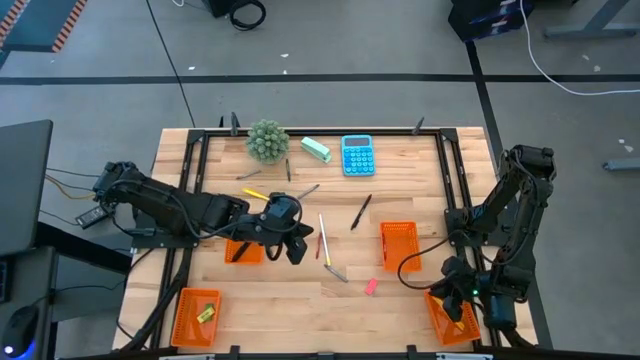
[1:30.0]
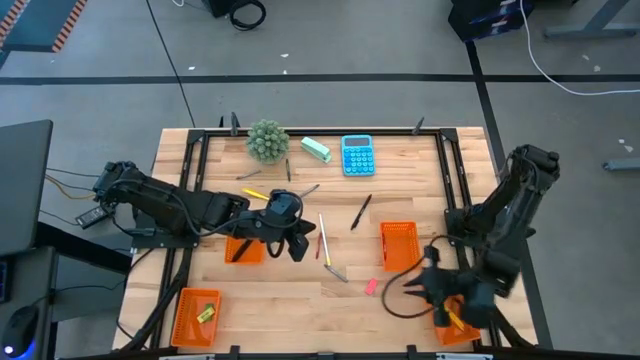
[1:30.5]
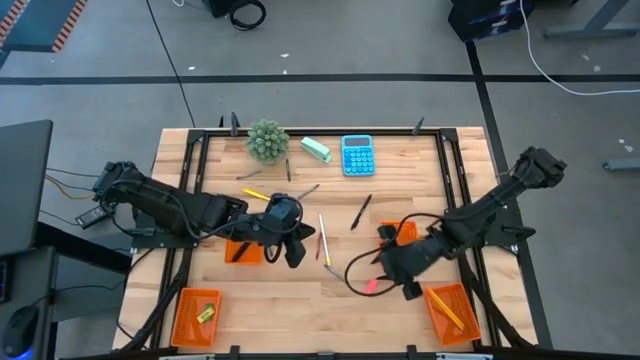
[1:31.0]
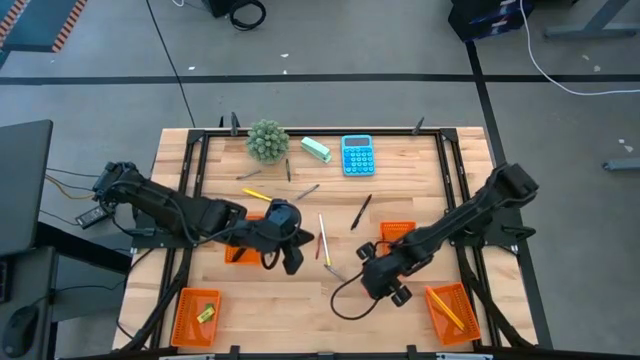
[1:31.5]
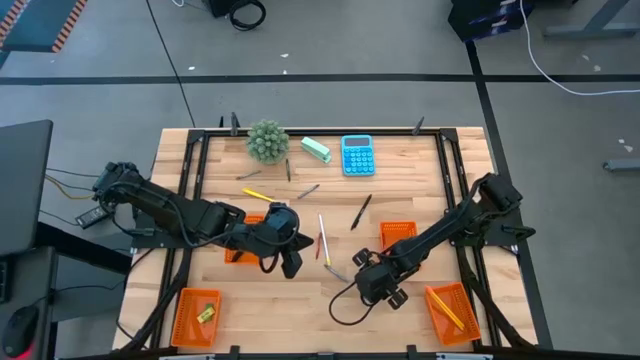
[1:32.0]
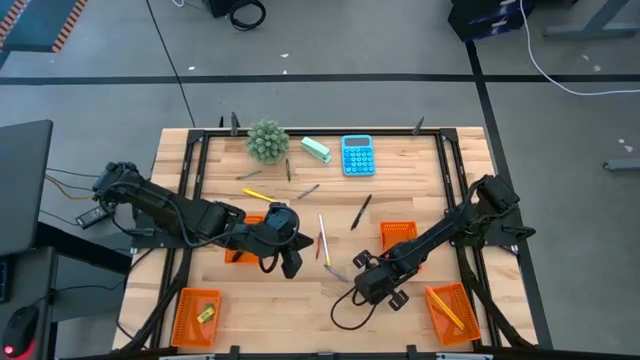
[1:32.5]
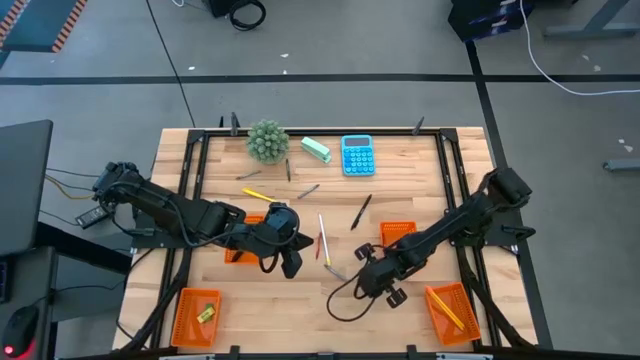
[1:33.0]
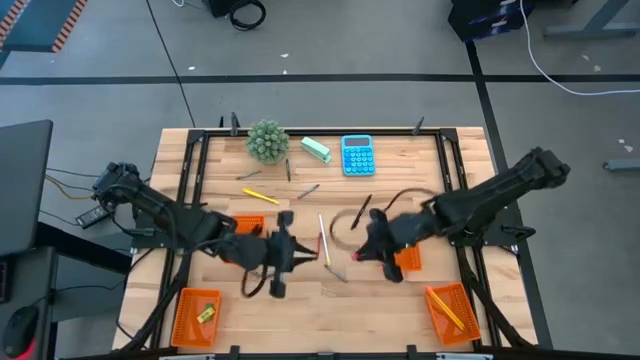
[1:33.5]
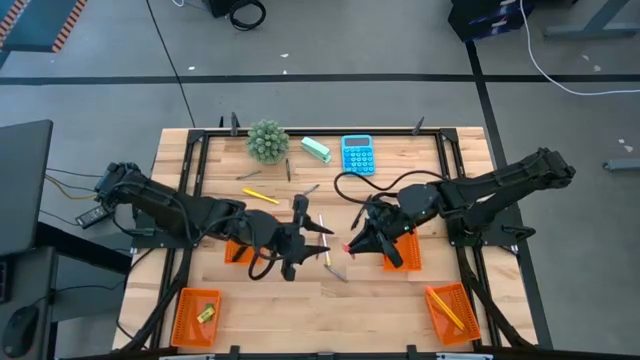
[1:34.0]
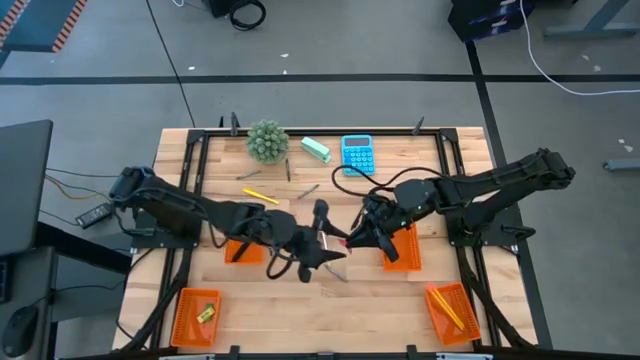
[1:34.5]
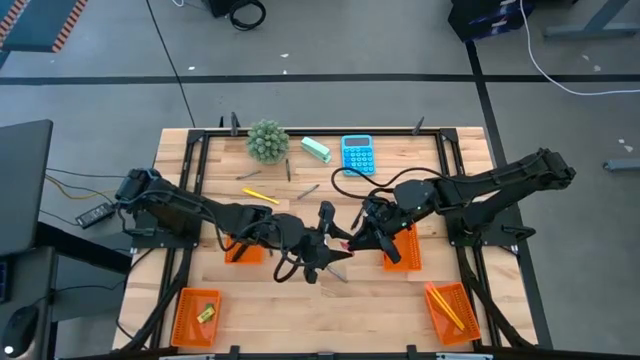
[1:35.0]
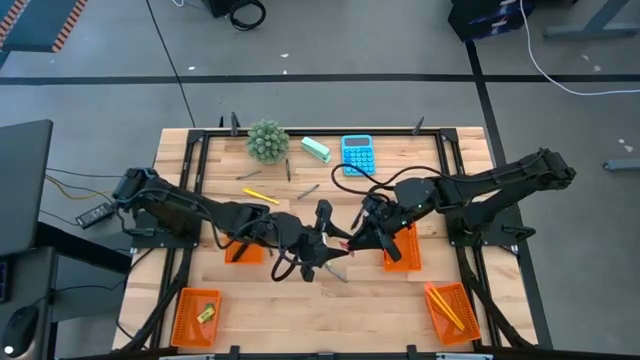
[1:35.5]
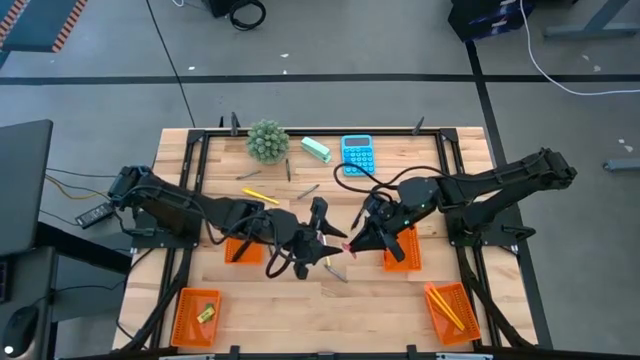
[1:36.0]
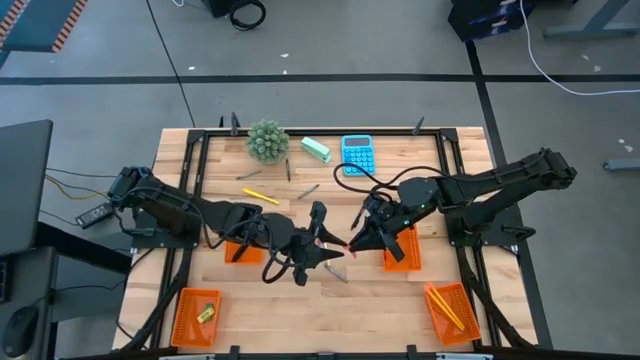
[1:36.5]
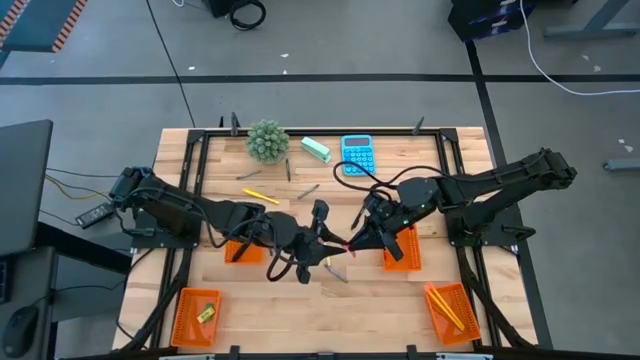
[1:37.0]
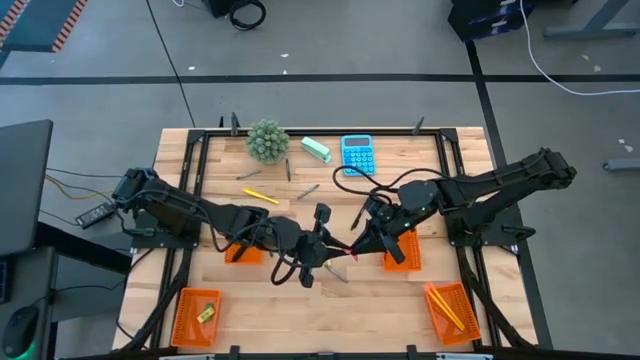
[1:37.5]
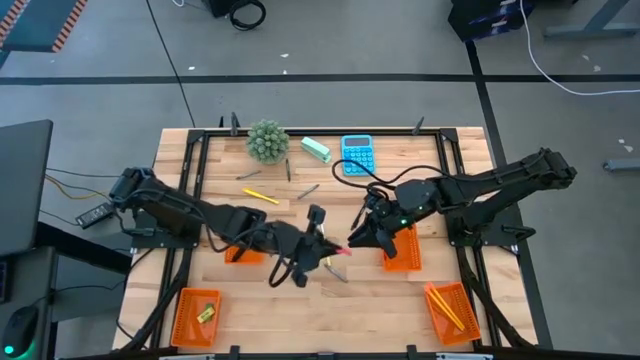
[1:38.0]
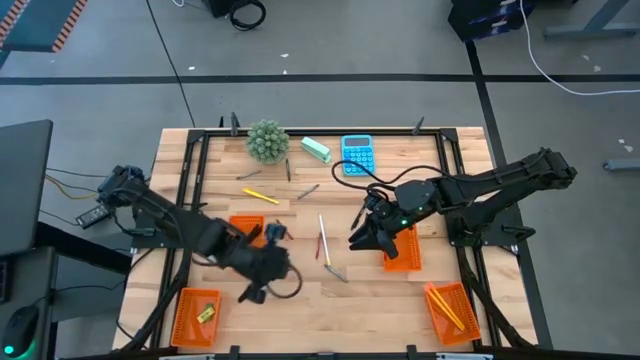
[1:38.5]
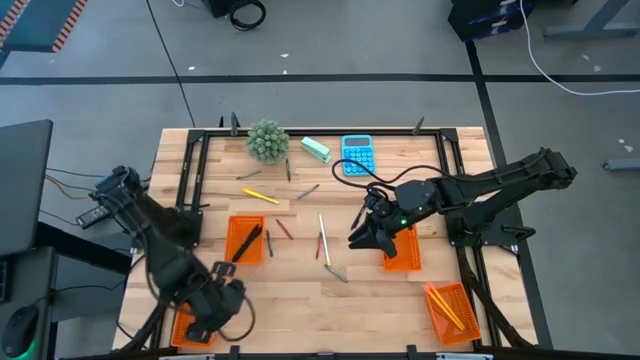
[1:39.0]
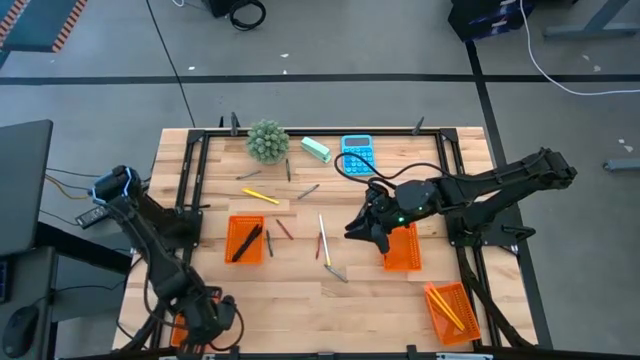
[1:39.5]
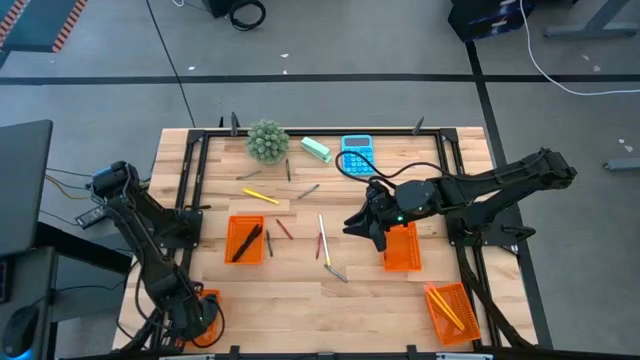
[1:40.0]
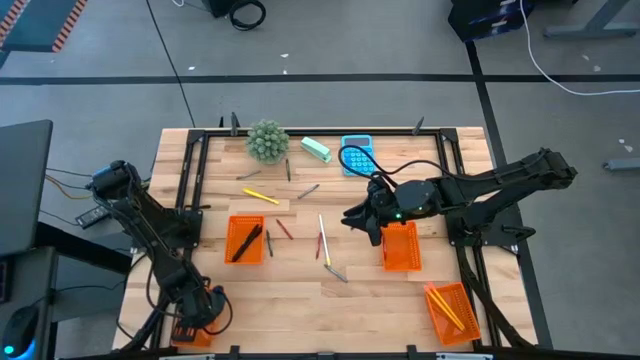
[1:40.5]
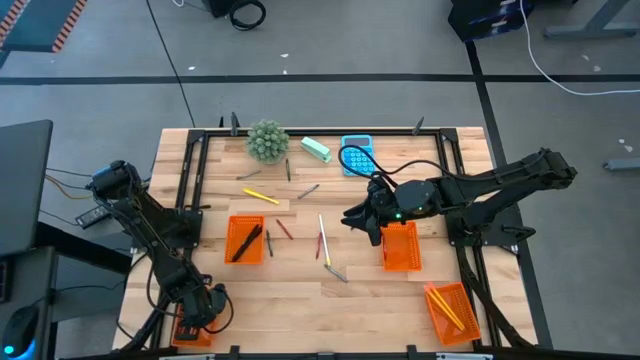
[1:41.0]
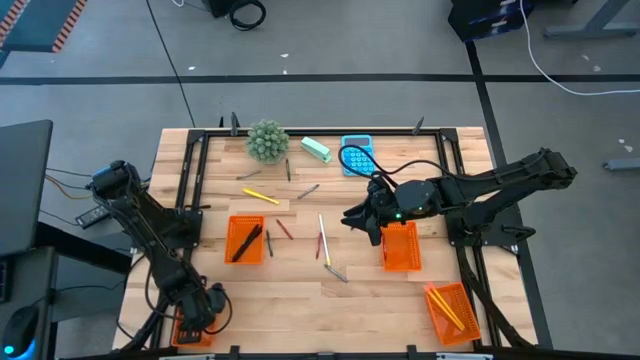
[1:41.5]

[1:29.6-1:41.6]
Task: Sort crayons/erasers/pens/pencils in bins
Put the pink eraser into the bottom left orange basket

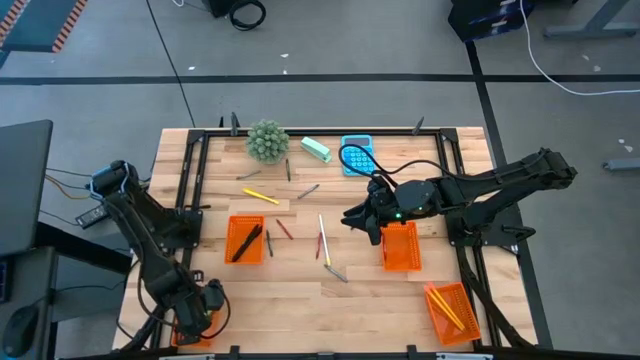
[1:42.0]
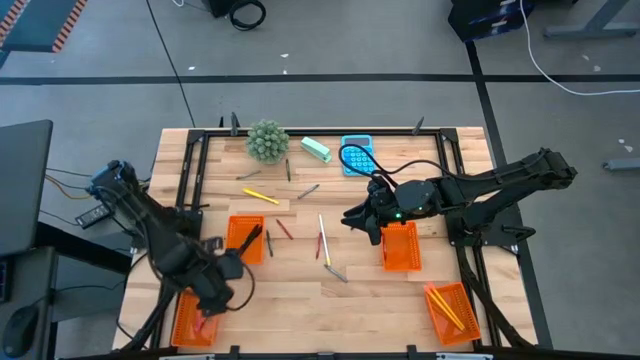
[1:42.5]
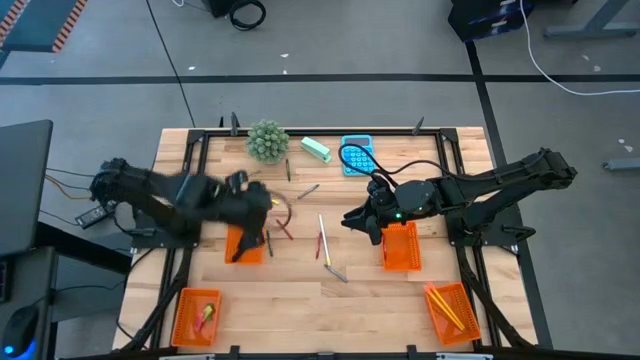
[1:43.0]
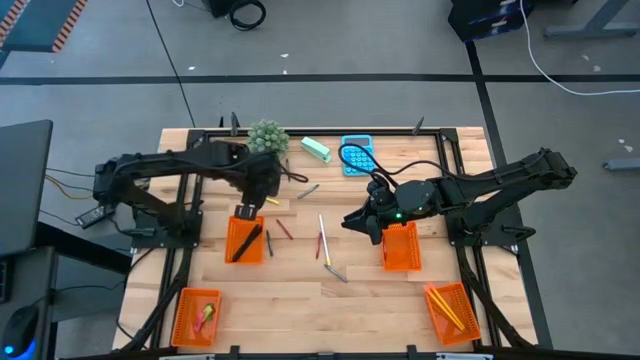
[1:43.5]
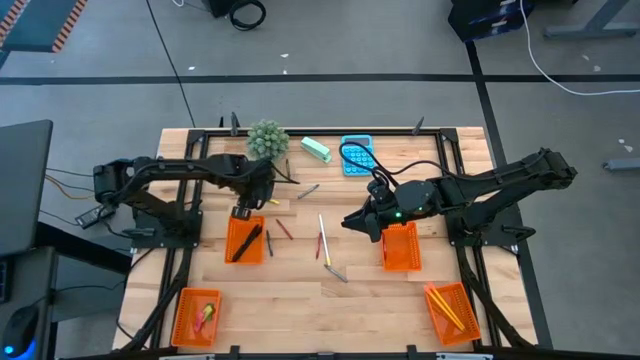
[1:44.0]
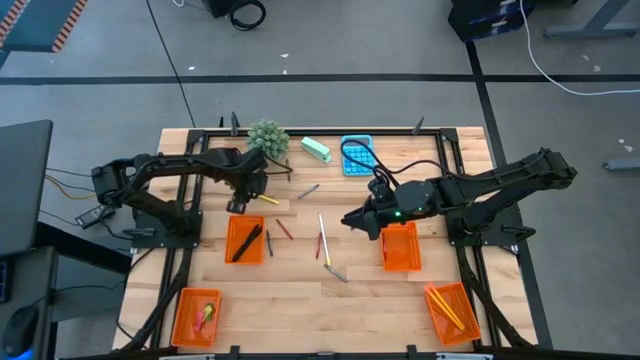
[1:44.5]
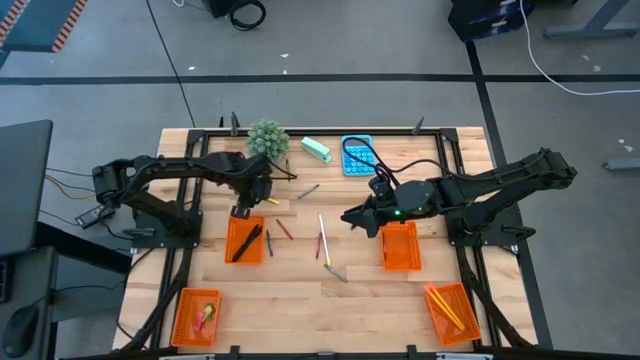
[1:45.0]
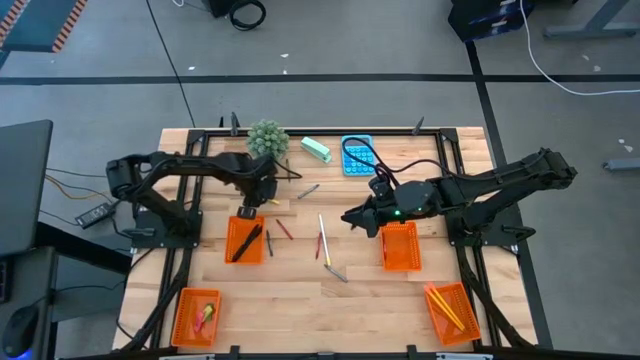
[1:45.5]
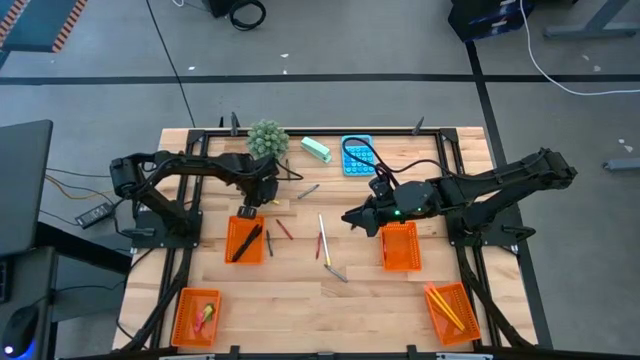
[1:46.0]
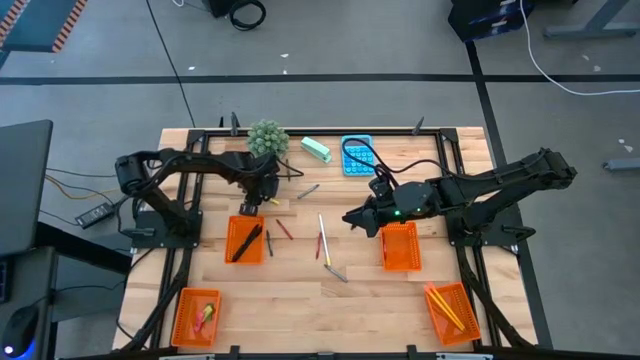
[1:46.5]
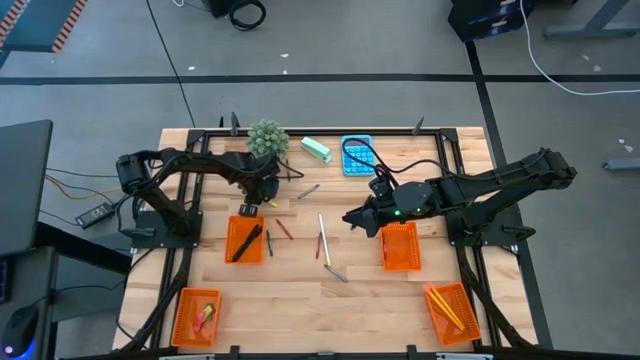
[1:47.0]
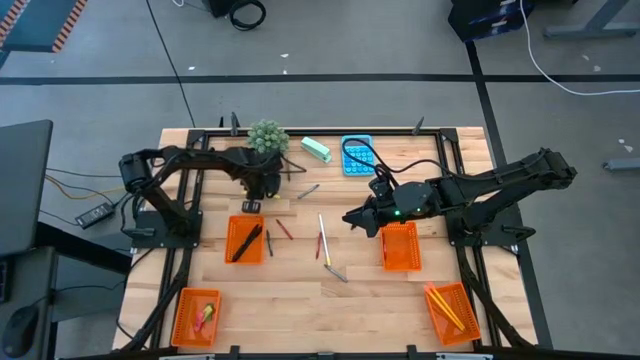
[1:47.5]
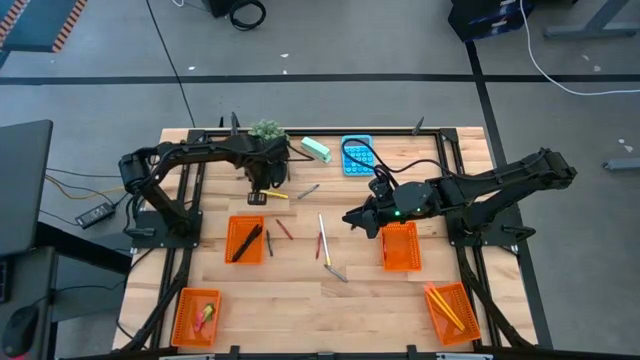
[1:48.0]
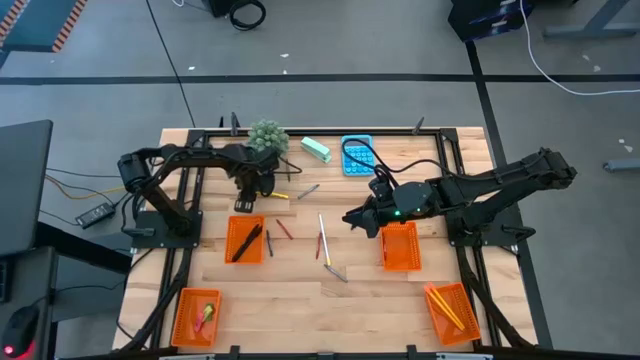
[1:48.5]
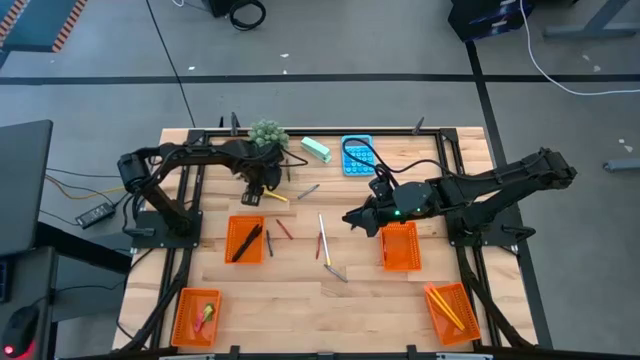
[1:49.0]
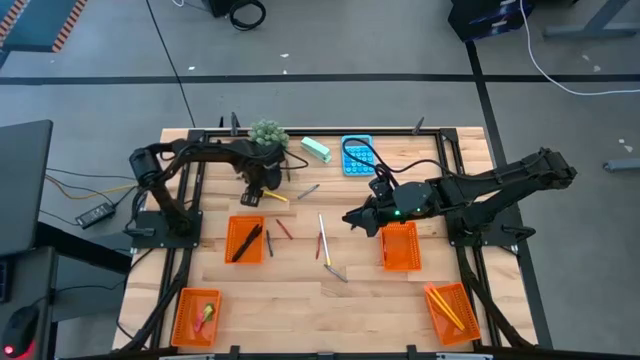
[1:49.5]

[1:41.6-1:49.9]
Put the yellow pen into the top left orange basket

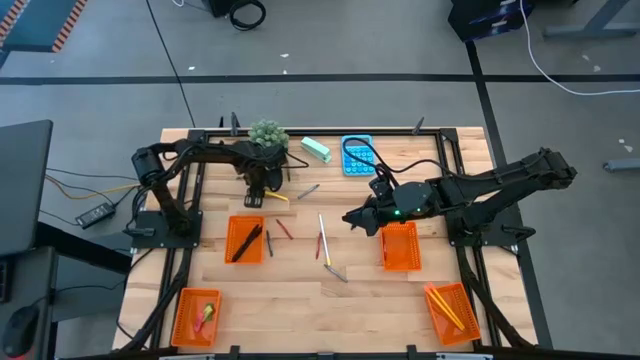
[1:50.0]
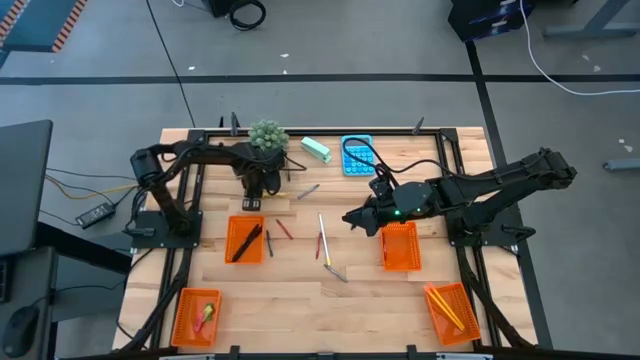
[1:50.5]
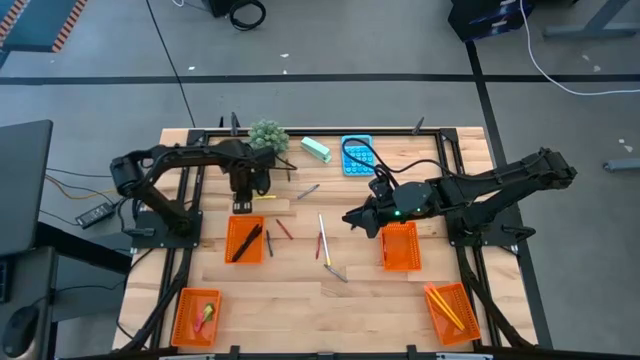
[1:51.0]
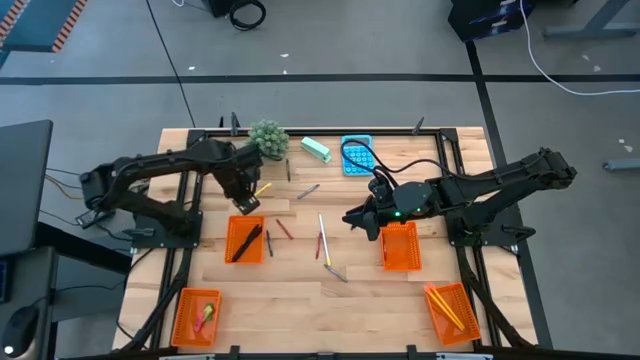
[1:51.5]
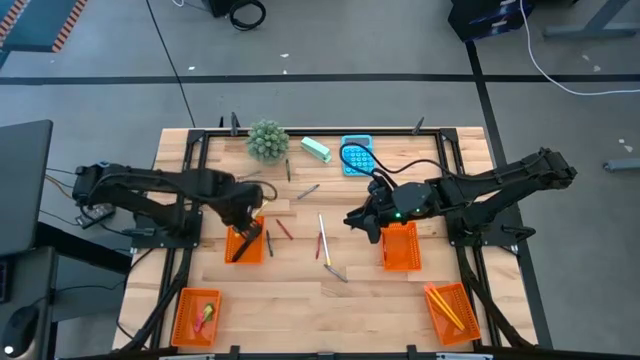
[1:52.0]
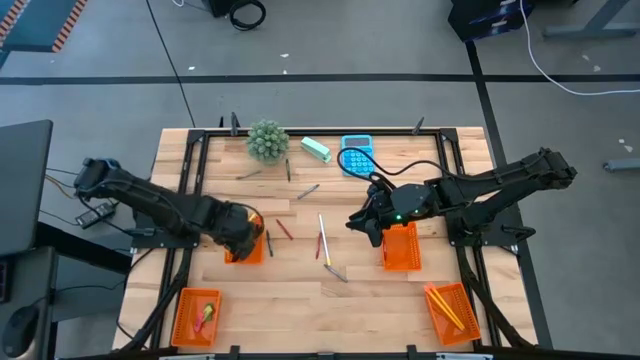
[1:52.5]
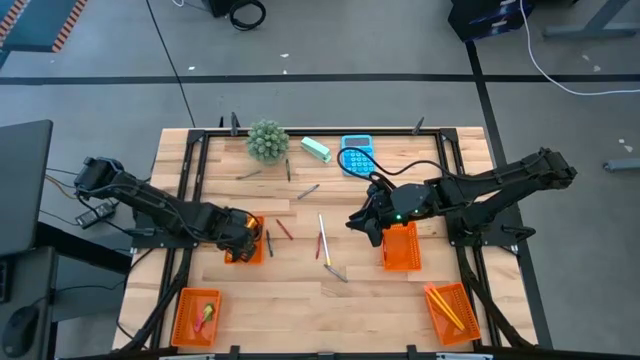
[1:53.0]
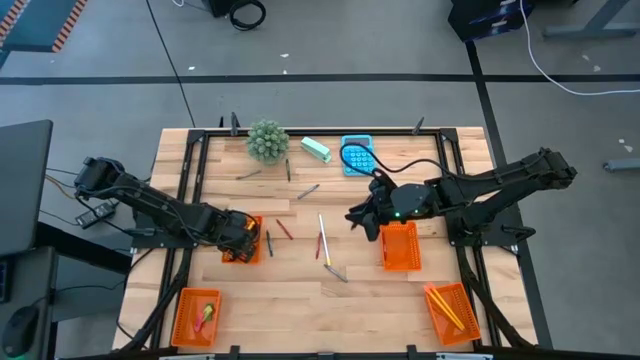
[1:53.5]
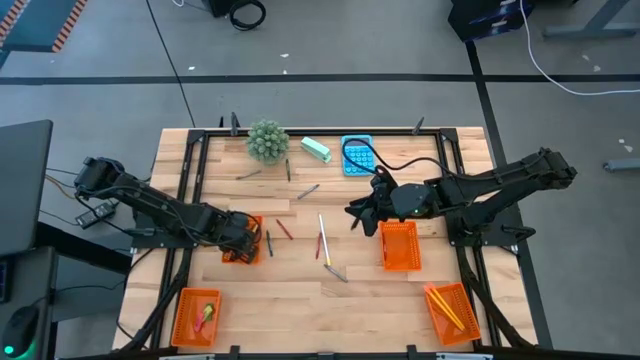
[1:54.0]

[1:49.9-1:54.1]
Put the yellow pen into the top left orange basket
